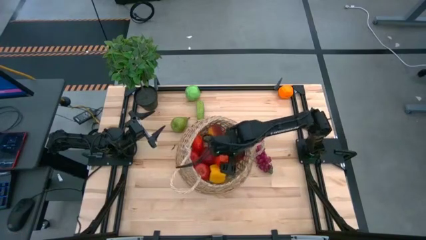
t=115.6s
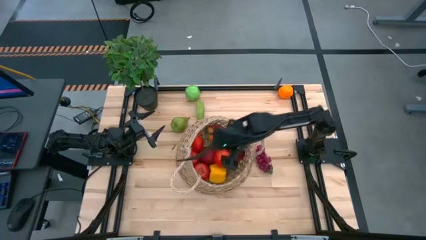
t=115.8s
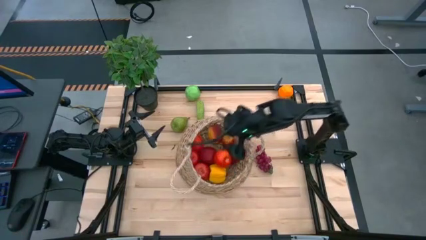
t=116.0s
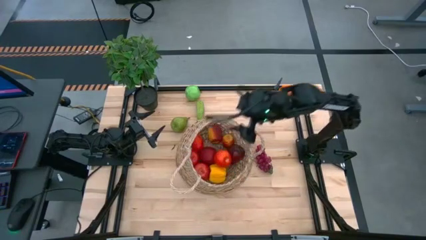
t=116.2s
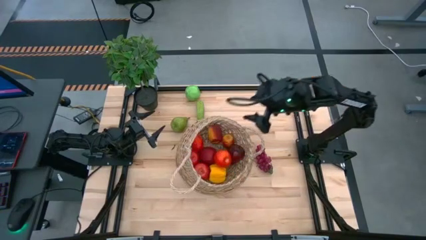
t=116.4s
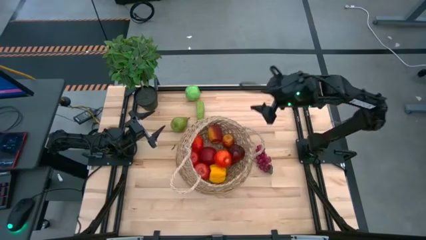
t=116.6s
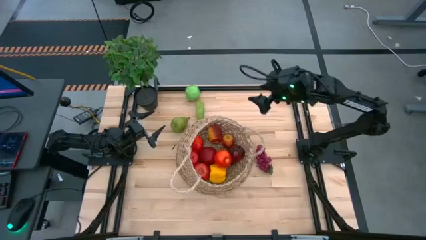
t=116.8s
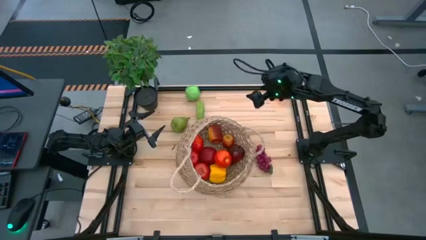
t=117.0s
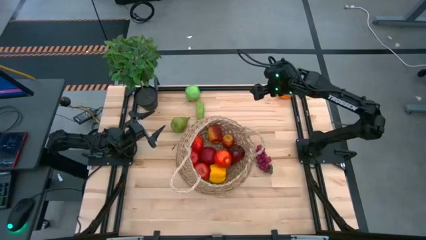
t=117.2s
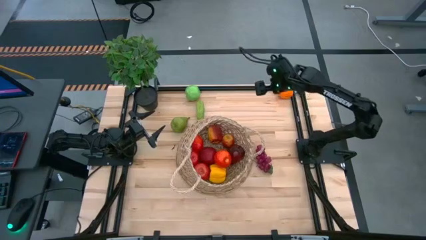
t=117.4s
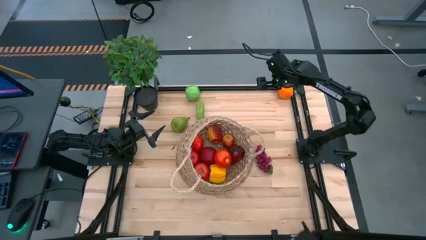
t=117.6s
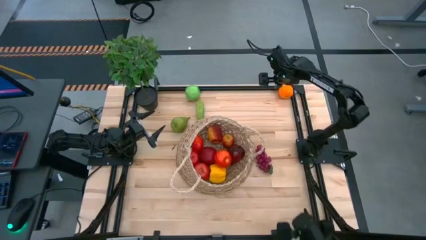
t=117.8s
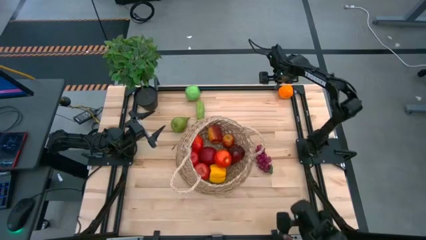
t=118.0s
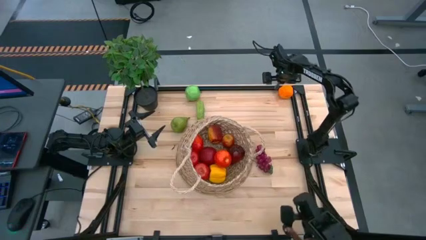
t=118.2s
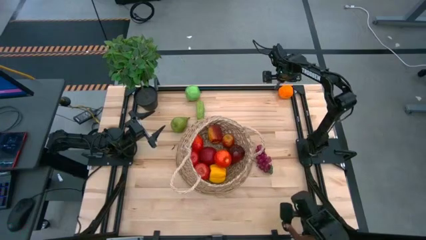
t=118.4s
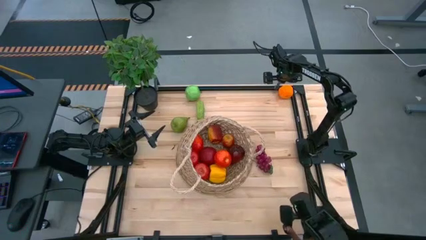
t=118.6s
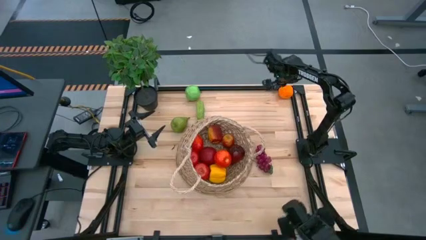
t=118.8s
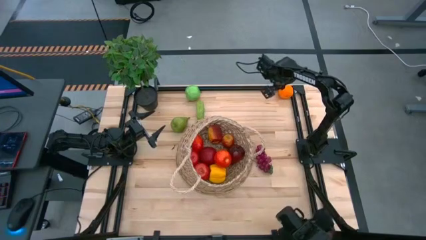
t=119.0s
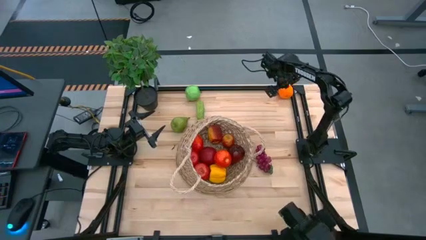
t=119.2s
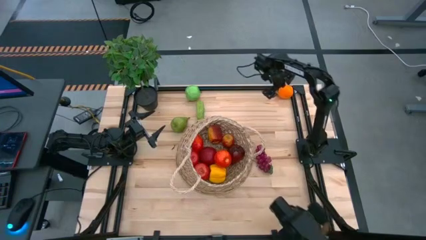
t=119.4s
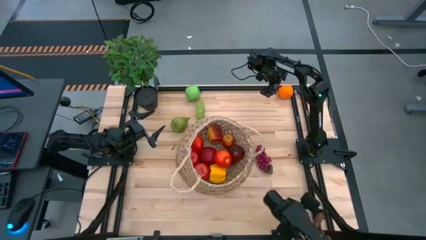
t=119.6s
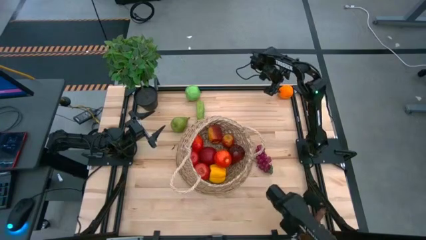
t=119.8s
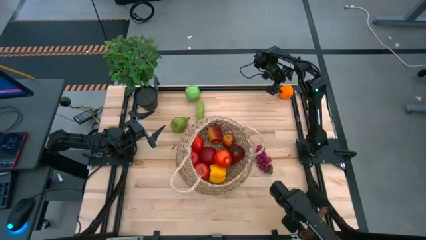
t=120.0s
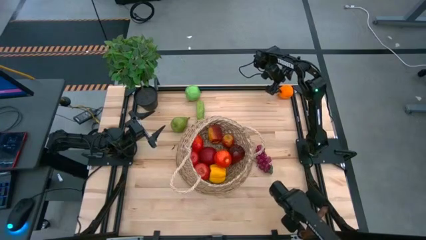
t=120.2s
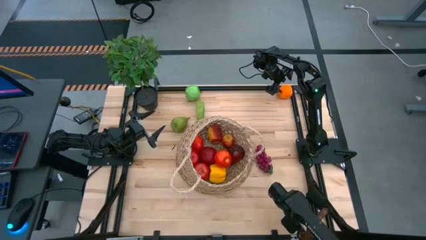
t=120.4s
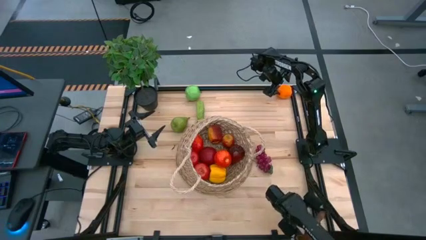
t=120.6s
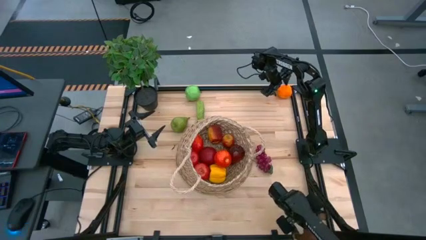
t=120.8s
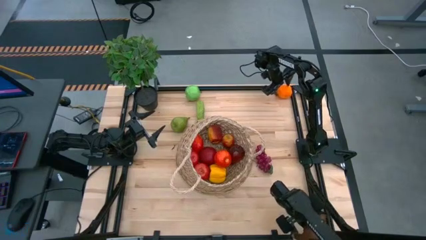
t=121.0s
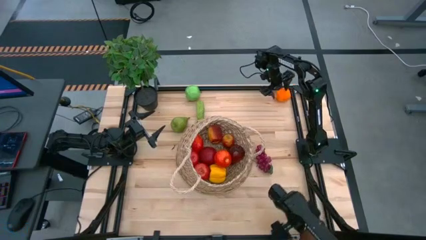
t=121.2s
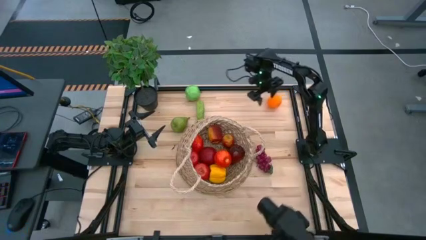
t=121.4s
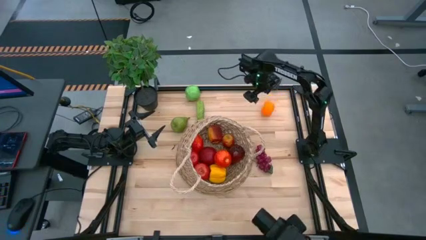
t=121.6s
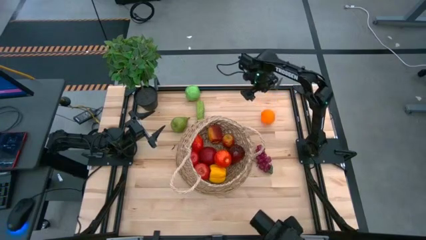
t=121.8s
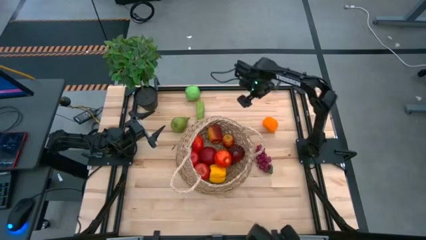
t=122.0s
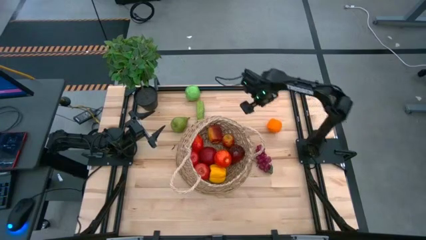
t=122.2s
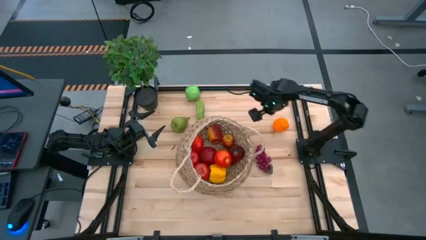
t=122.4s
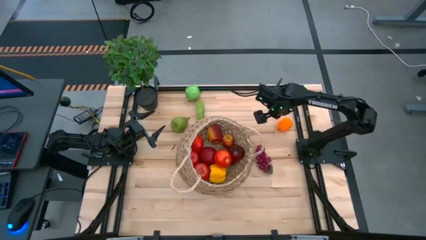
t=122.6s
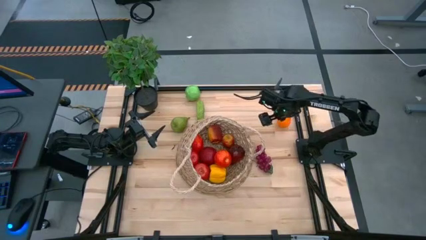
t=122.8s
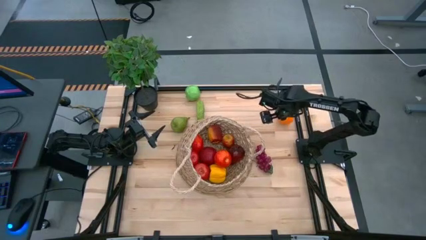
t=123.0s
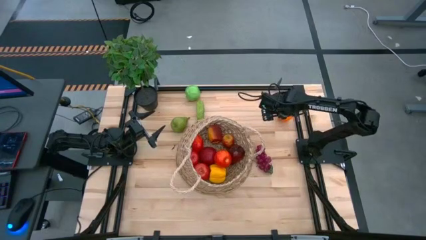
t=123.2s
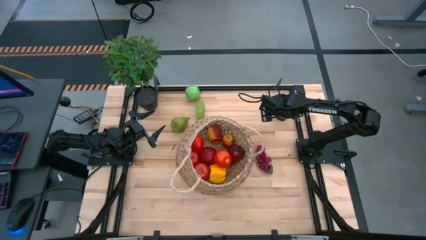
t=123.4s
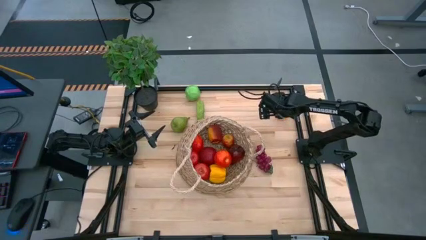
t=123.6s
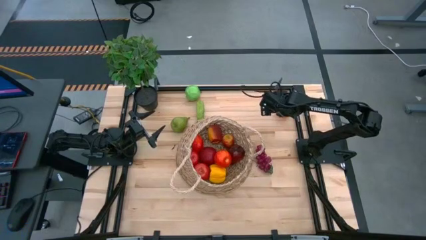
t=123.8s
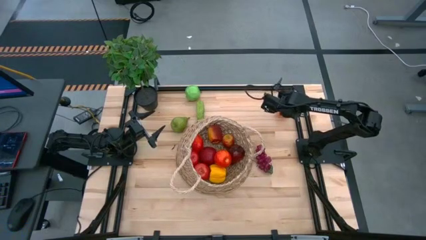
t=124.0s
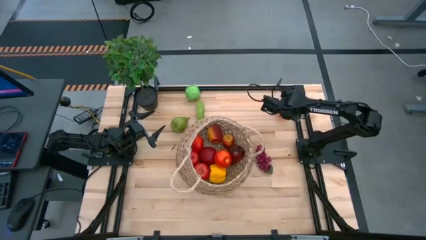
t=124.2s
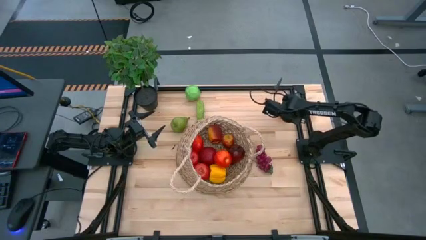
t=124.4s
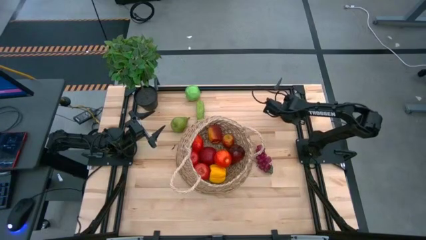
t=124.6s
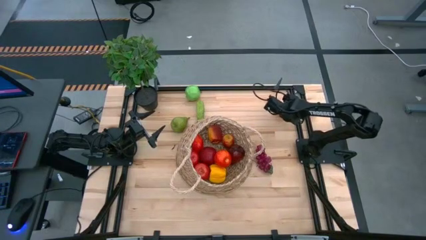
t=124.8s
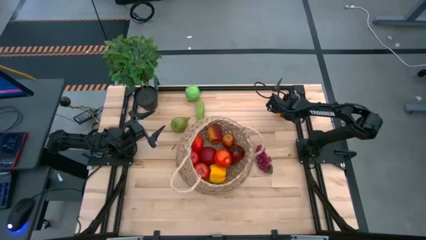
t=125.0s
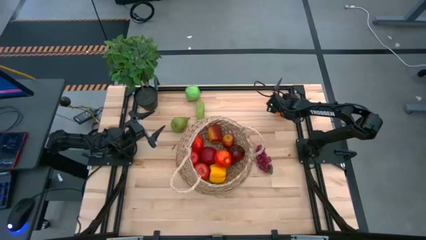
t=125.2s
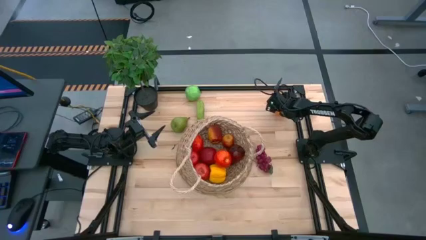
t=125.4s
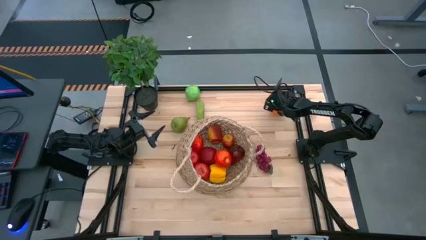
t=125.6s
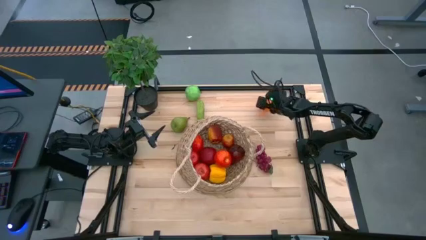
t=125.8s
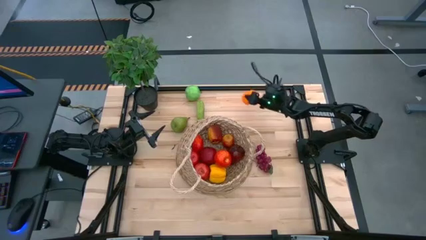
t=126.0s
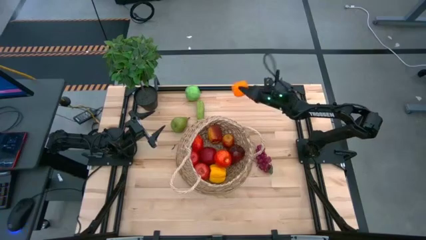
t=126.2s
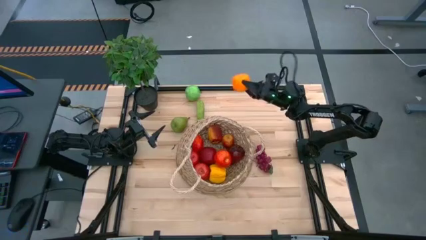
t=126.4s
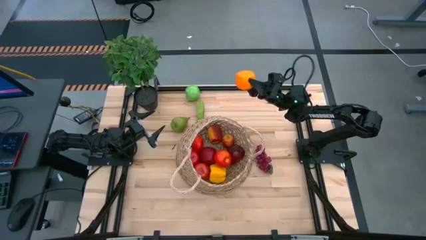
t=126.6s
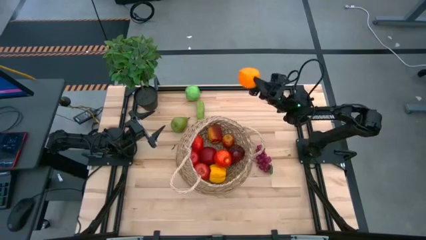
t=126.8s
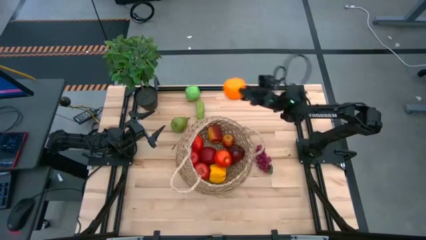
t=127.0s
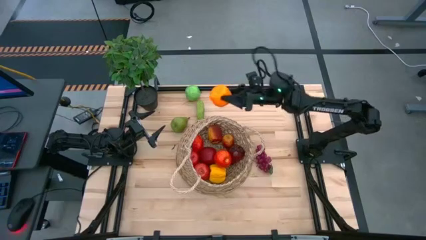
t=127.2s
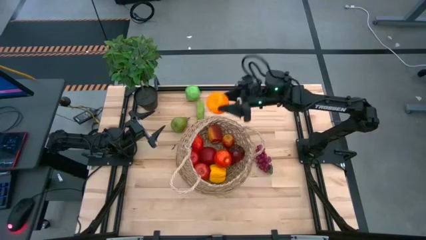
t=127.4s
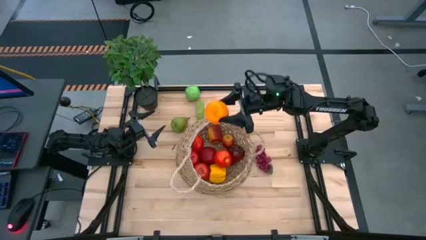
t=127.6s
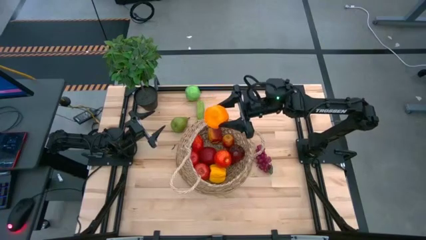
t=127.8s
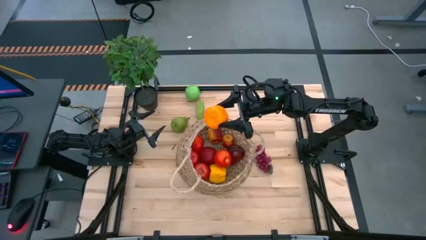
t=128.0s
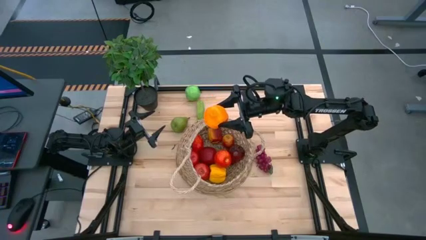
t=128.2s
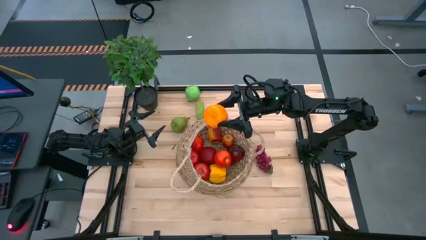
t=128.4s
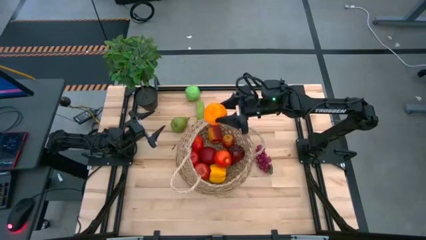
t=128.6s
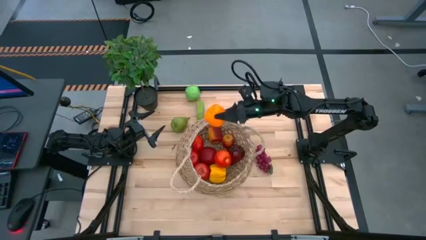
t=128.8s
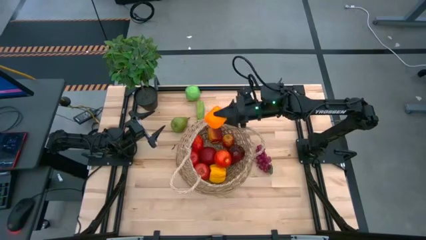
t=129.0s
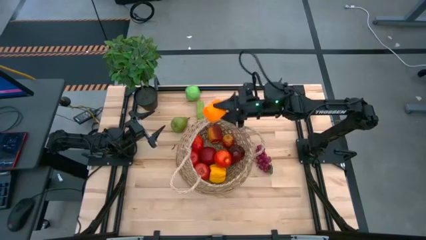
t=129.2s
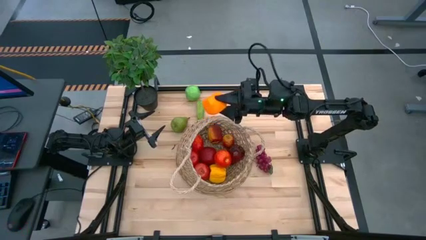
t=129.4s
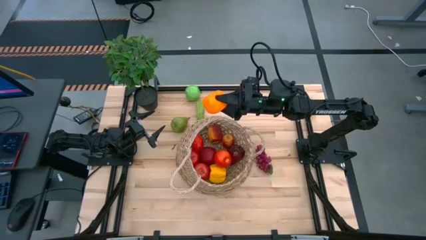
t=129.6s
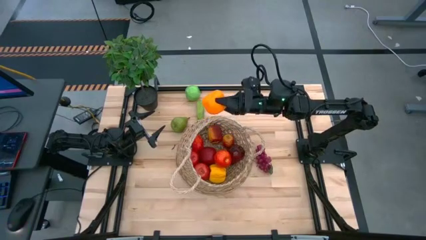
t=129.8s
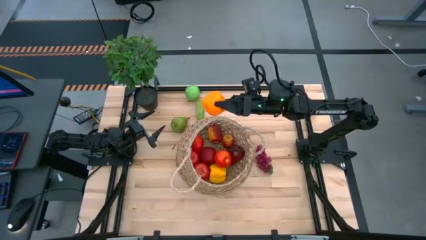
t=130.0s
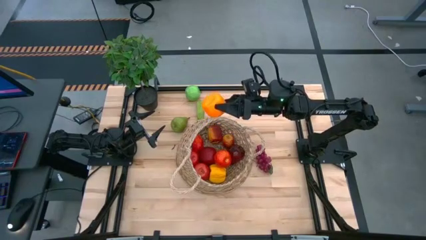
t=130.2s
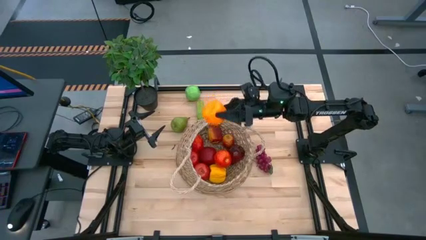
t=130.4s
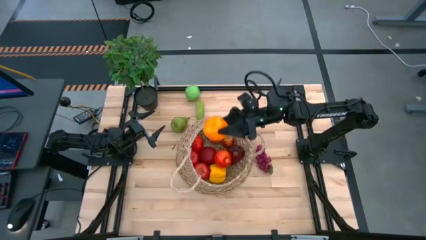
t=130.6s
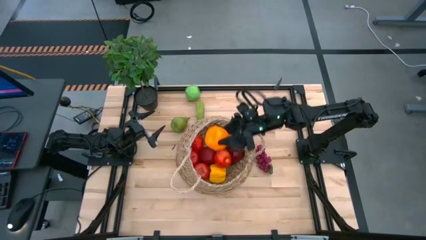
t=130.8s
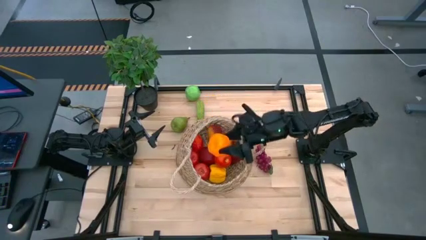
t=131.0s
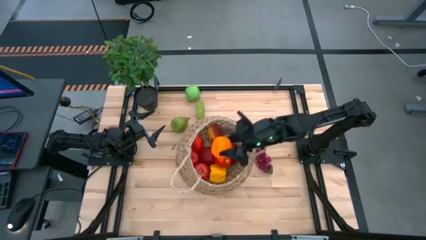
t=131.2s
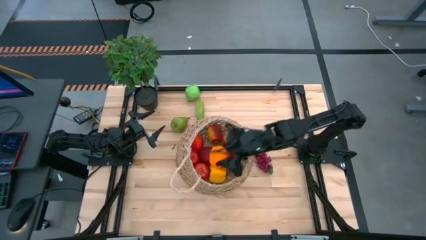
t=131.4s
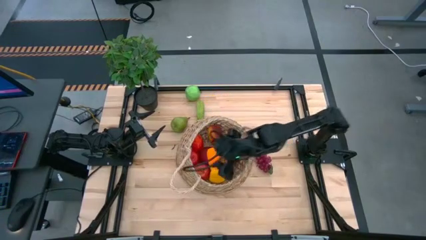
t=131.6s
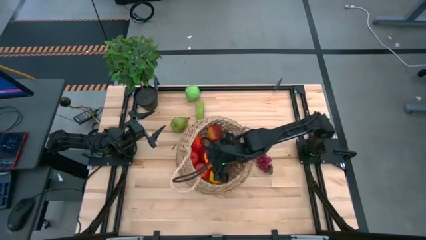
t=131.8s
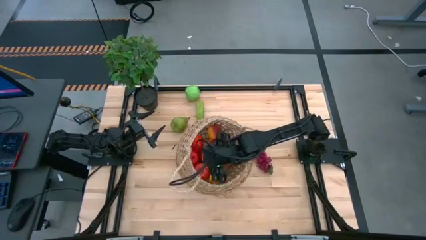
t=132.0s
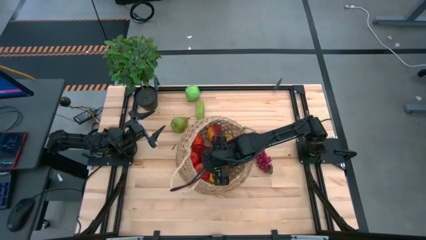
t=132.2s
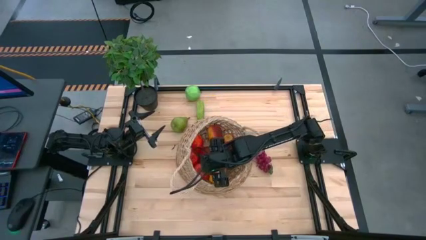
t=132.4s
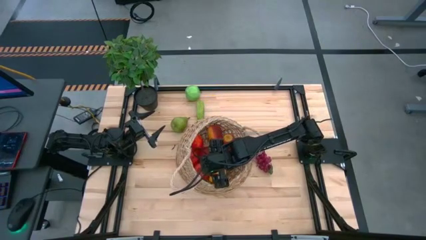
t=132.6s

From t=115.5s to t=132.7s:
Task: Build produce basket
Put the orange into the woven basket
